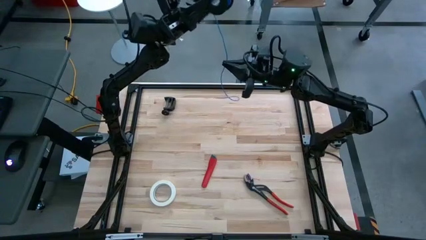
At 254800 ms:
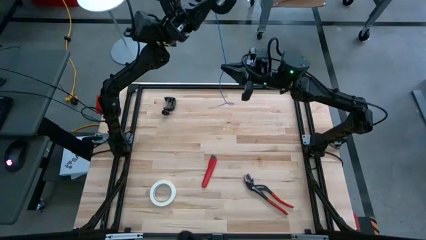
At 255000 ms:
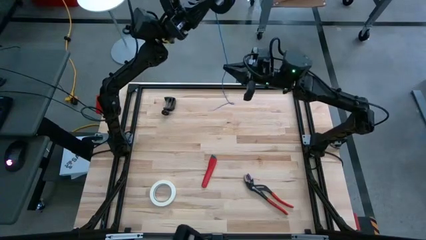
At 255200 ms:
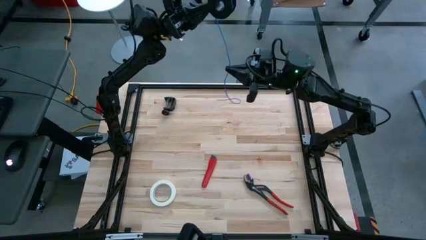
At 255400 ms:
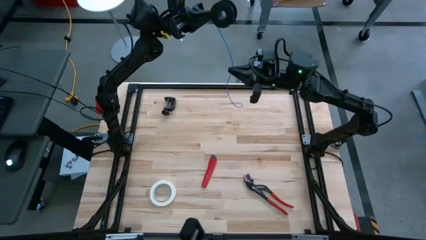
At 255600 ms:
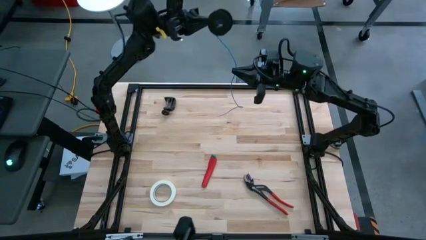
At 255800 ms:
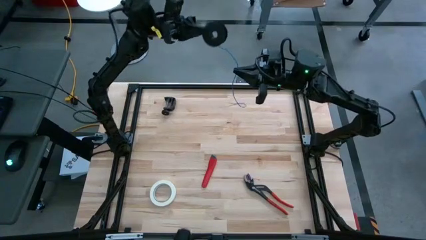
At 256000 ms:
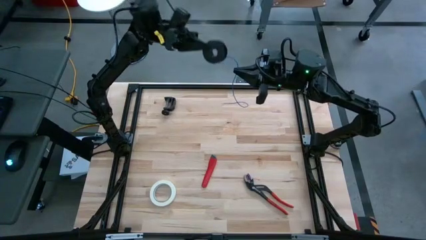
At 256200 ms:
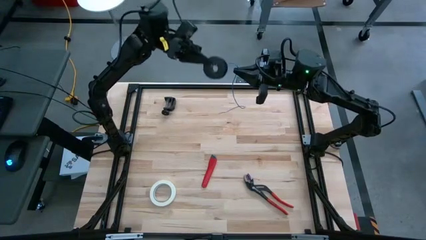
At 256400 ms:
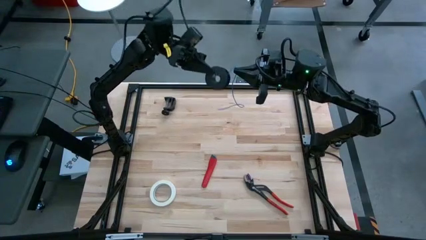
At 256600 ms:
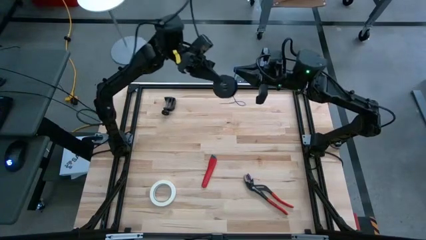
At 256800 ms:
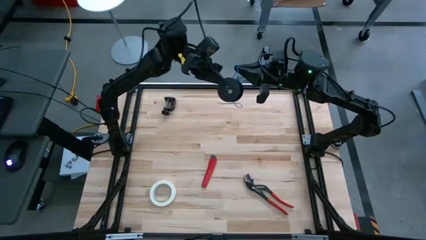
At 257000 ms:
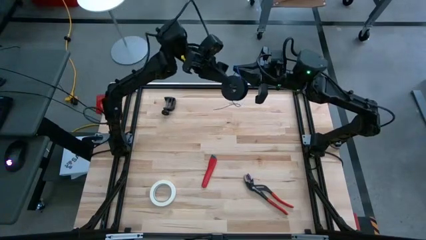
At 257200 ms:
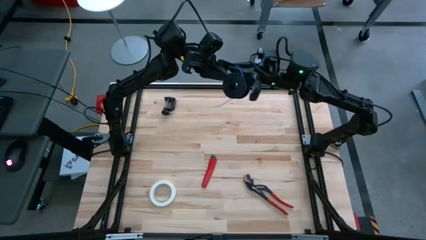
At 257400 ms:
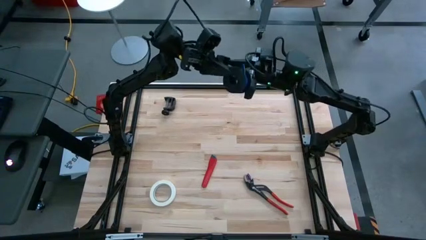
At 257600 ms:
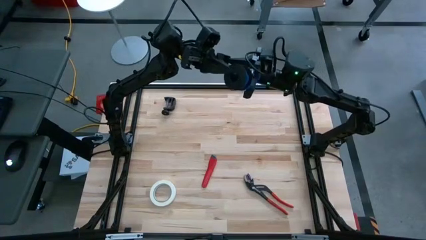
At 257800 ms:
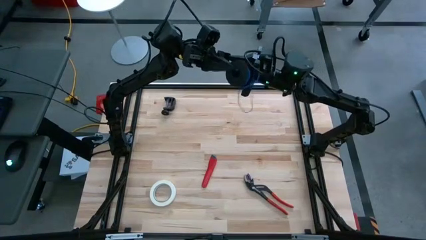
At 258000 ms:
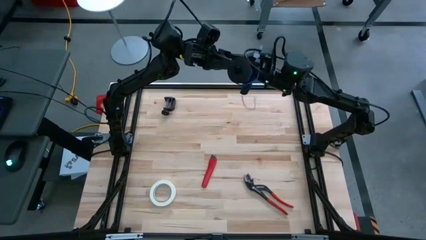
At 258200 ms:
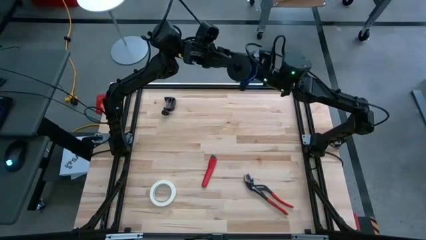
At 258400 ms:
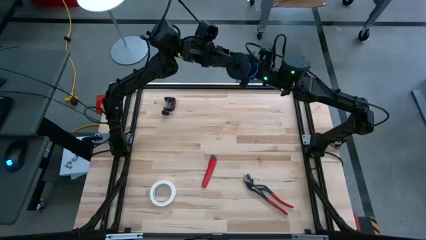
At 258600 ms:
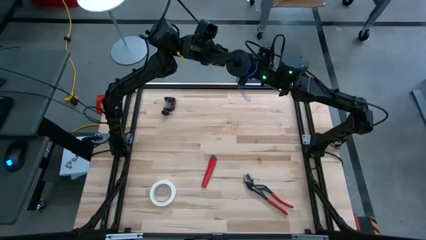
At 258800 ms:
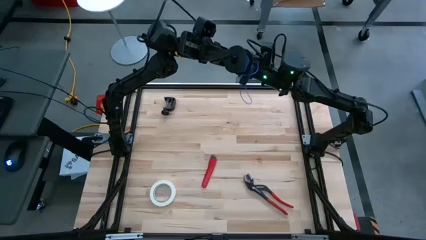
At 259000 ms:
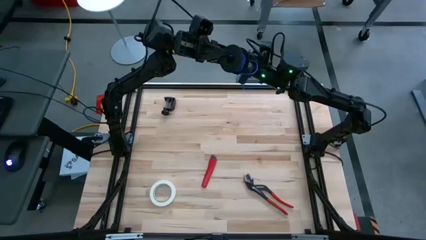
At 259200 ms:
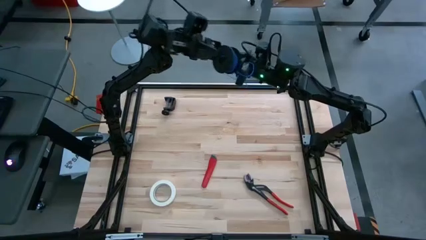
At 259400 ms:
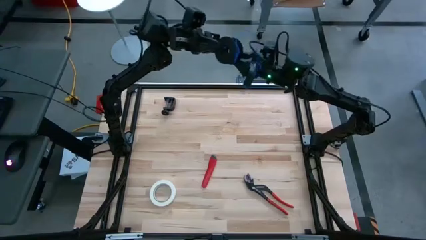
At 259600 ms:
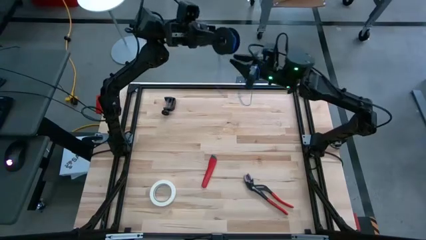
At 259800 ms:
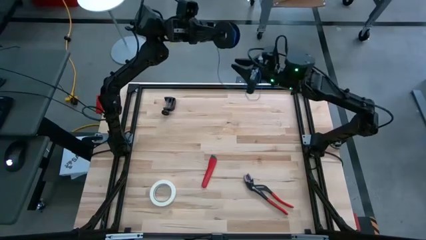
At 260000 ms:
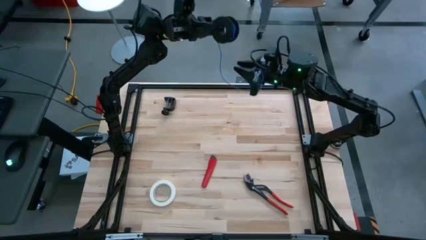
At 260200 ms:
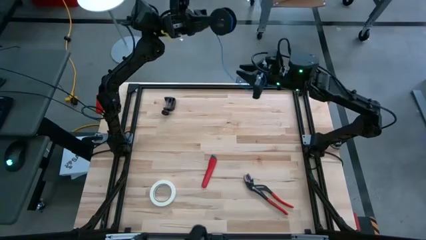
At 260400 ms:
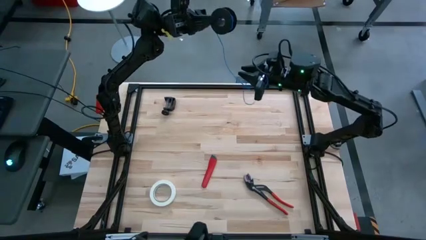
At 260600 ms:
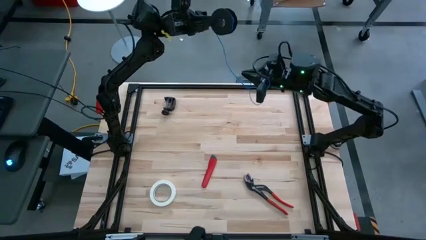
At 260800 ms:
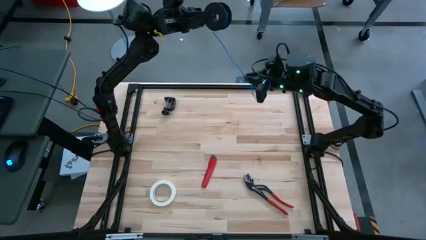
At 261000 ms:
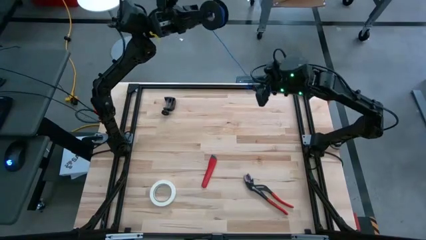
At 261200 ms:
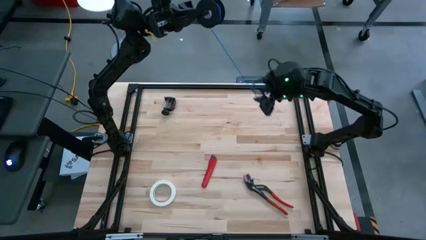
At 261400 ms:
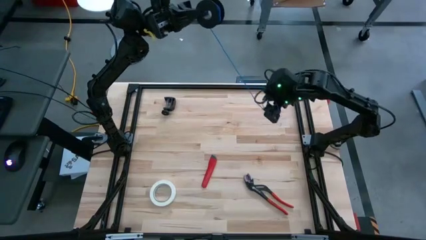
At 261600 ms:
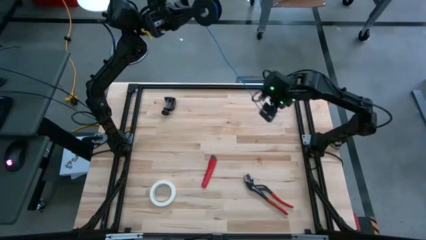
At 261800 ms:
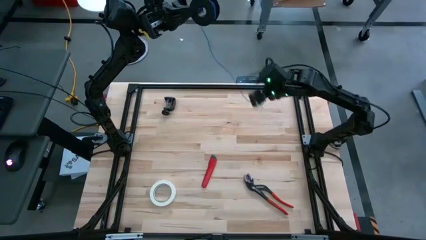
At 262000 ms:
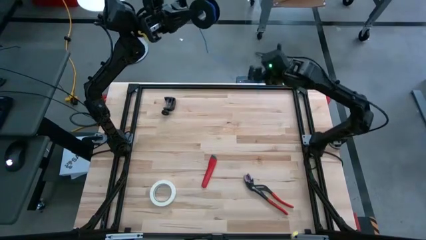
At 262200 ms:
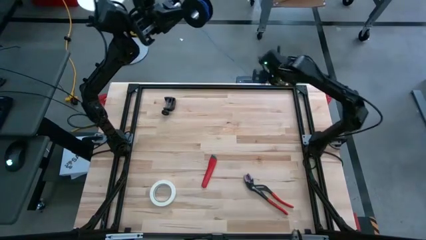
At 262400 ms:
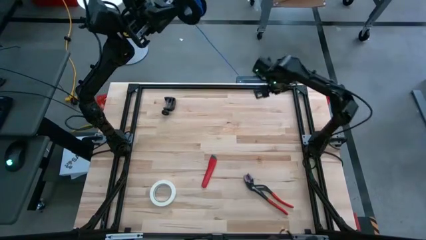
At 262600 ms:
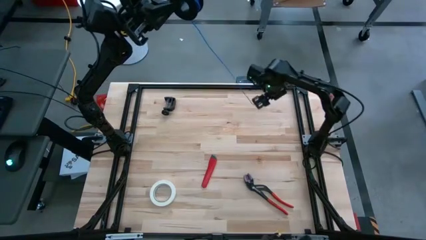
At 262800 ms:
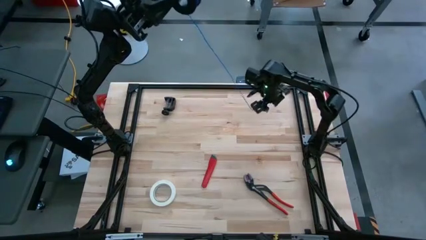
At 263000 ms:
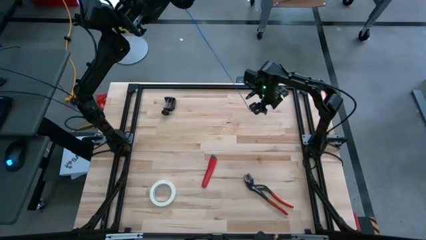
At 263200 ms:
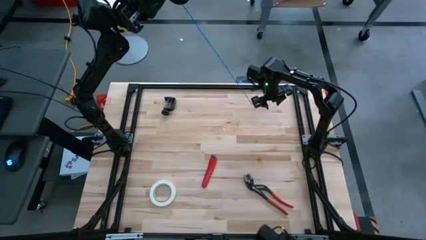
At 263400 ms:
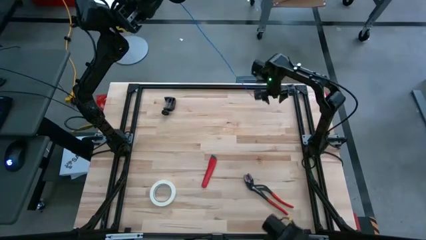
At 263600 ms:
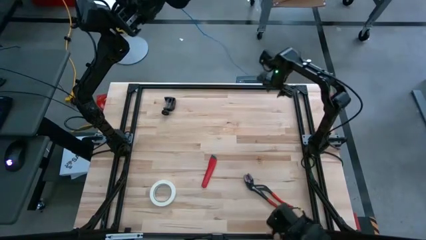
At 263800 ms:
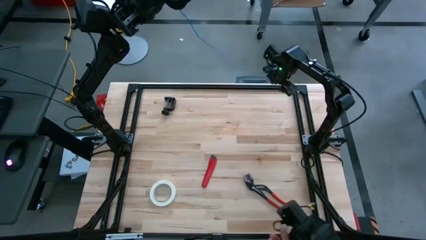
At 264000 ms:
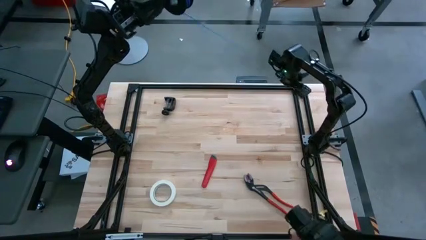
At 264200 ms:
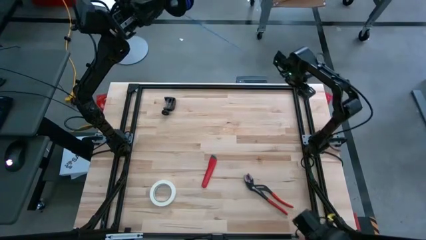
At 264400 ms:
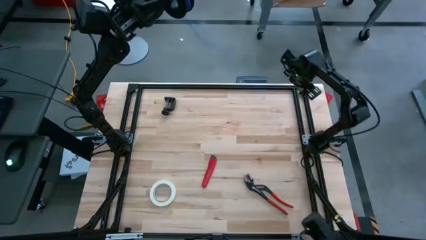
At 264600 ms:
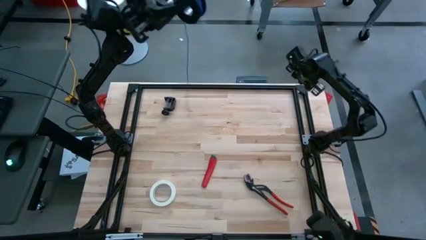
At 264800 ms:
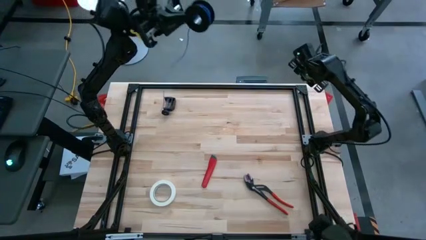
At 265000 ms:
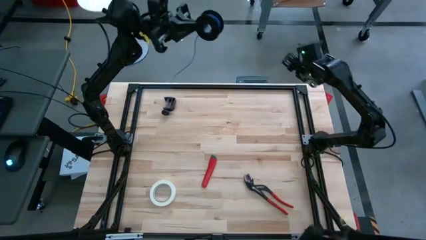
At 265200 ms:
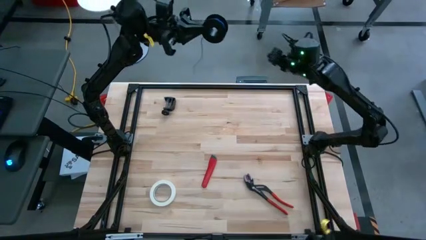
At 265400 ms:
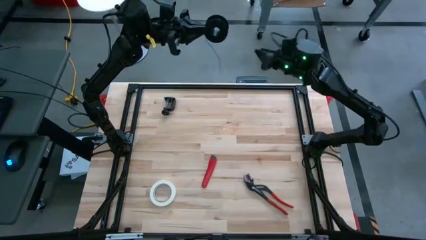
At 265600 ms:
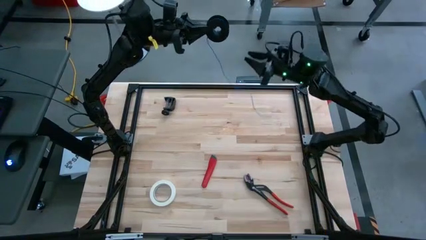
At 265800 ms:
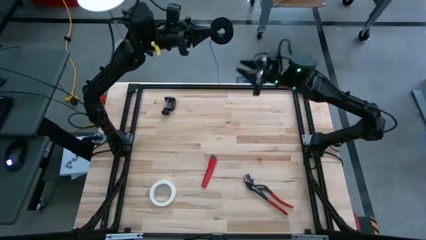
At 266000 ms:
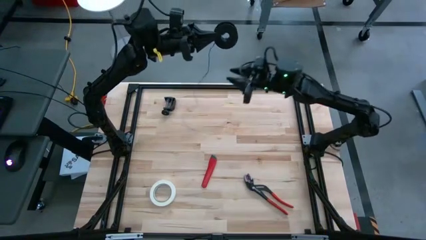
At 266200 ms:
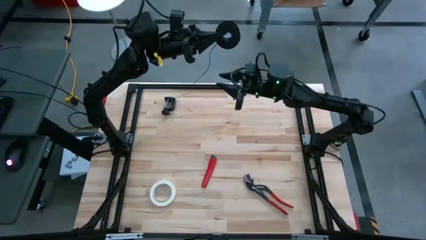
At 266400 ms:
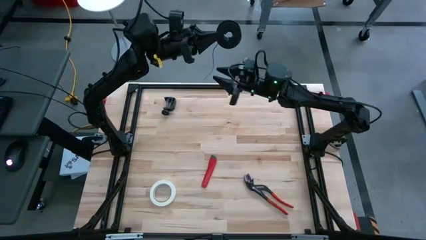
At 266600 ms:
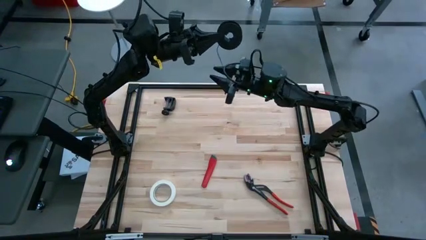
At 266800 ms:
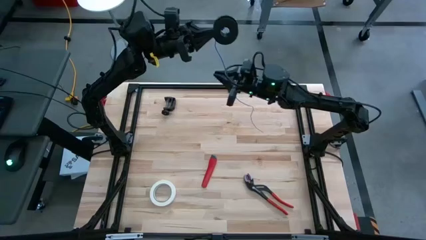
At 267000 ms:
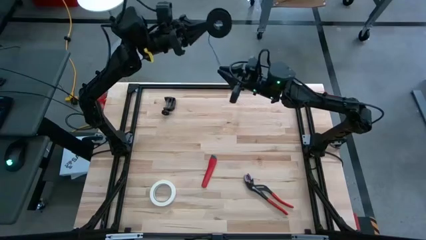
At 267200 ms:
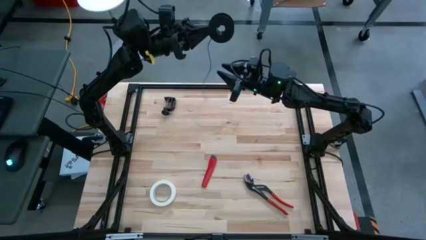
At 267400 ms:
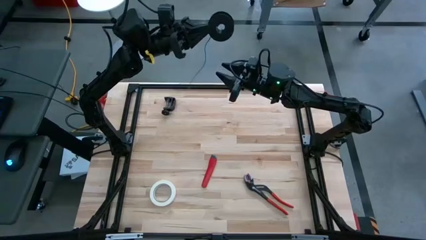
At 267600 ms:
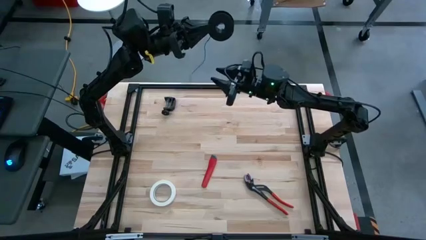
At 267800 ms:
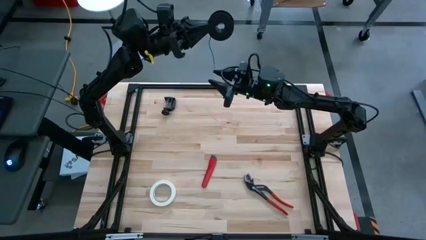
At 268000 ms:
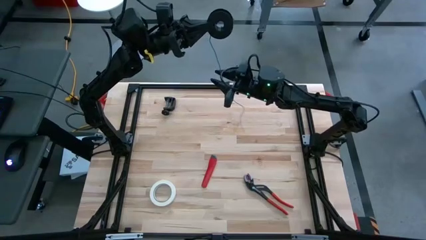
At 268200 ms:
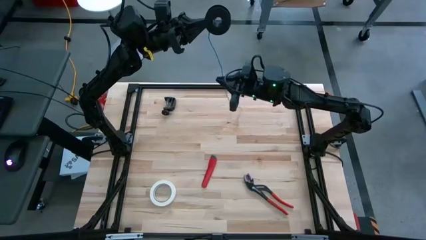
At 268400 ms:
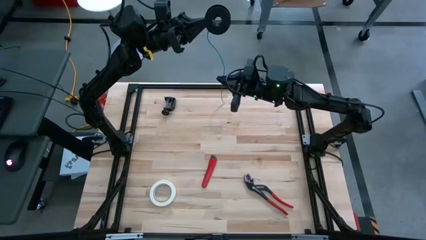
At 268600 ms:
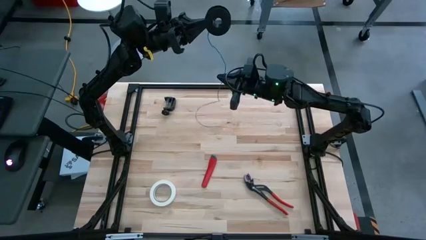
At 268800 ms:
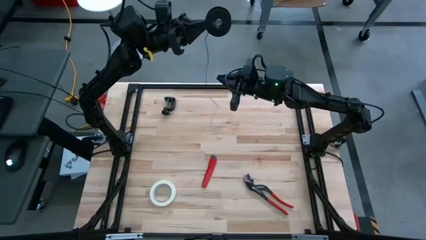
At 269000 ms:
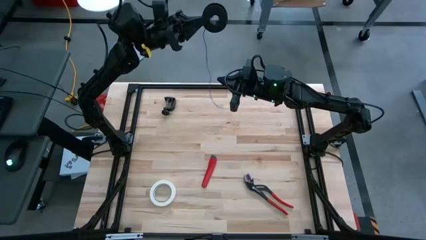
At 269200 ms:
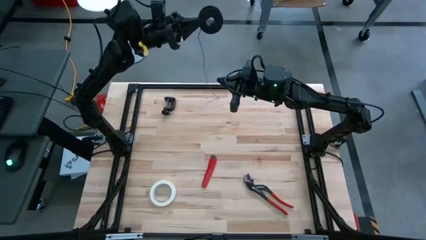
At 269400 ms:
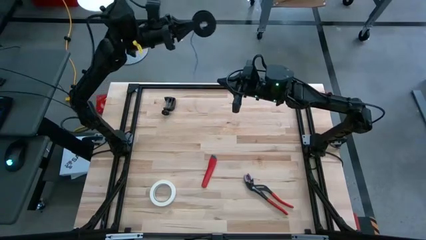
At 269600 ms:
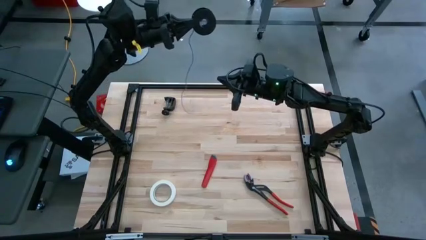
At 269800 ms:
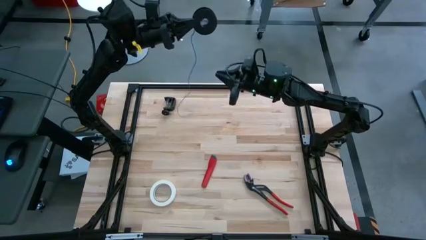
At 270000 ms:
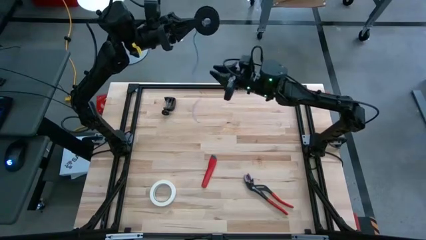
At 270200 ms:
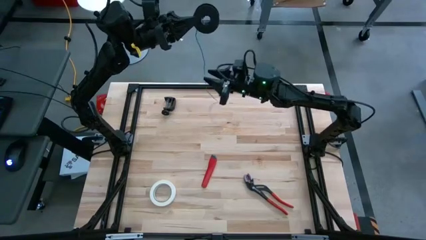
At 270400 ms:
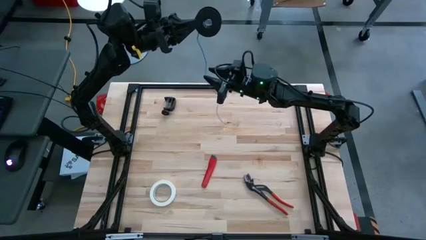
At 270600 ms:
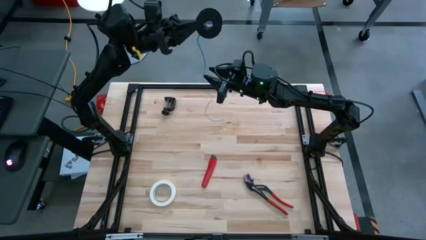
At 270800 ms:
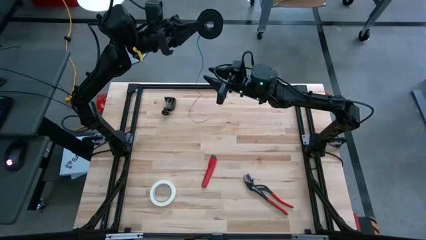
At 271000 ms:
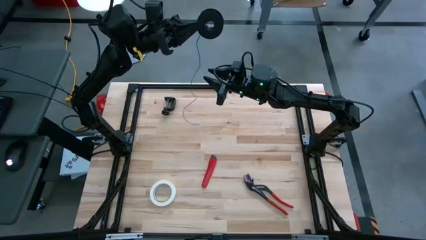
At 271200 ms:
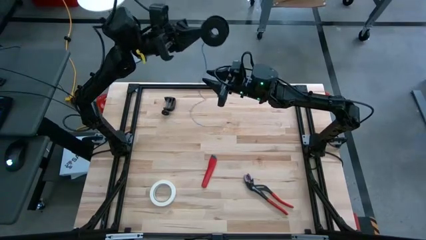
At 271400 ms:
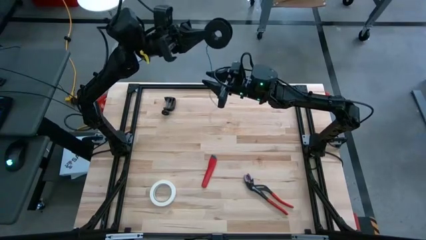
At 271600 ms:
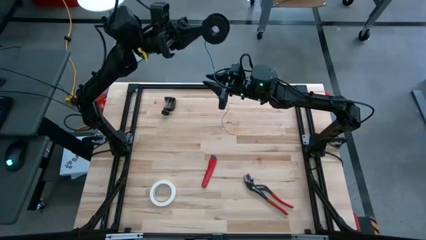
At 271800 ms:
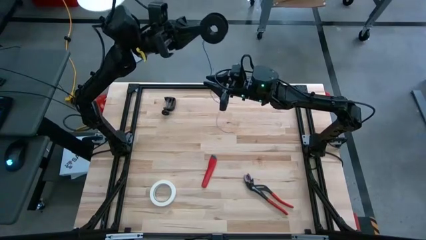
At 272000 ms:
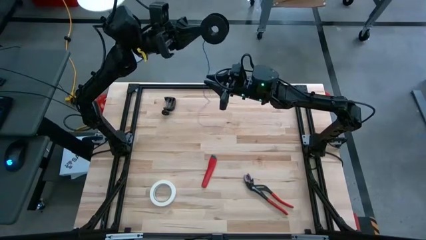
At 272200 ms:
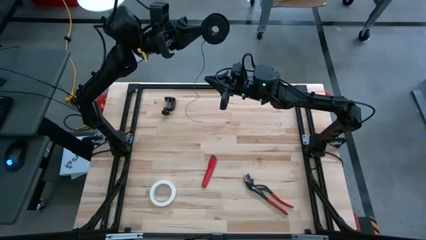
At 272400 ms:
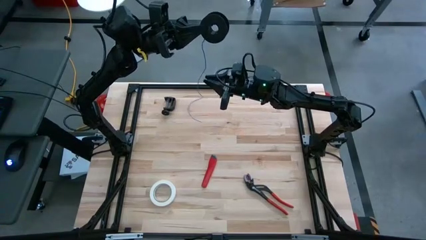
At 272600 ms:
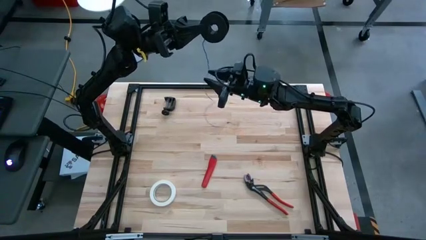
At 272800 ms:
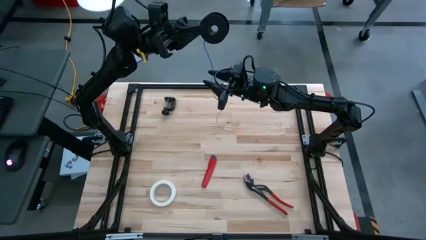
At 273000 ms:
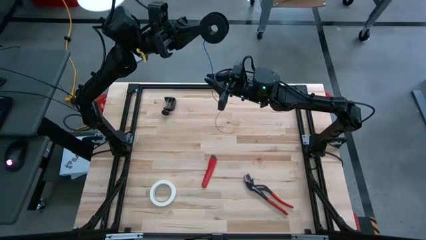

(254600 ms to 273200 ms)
Task: Coil cords
Coil the blue wire cable onto the black spool
